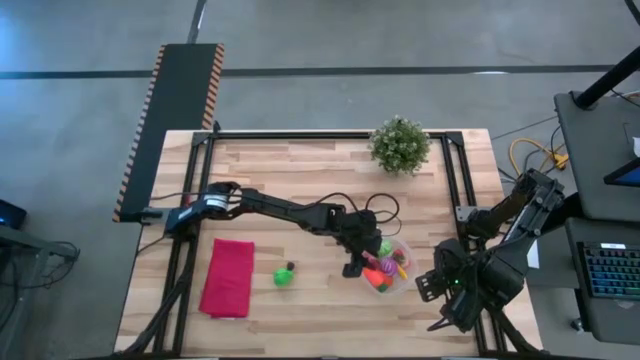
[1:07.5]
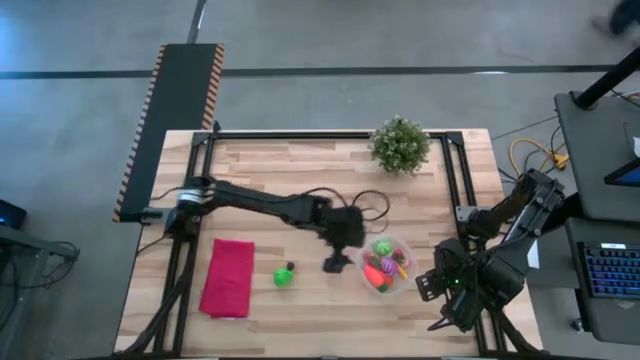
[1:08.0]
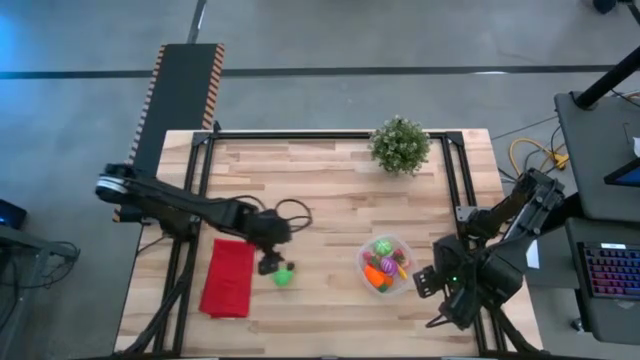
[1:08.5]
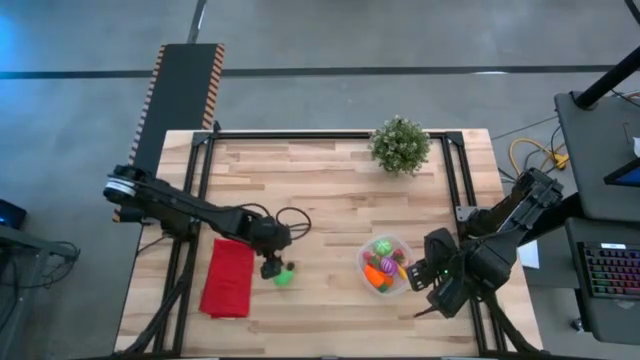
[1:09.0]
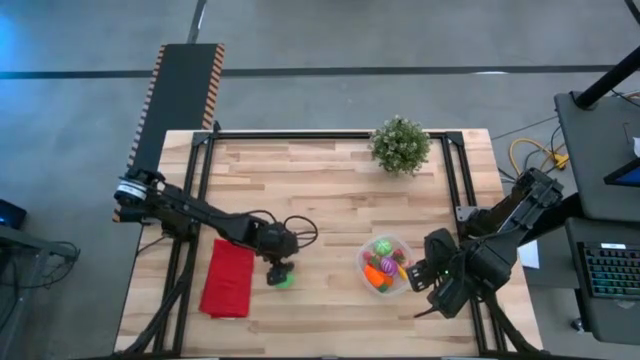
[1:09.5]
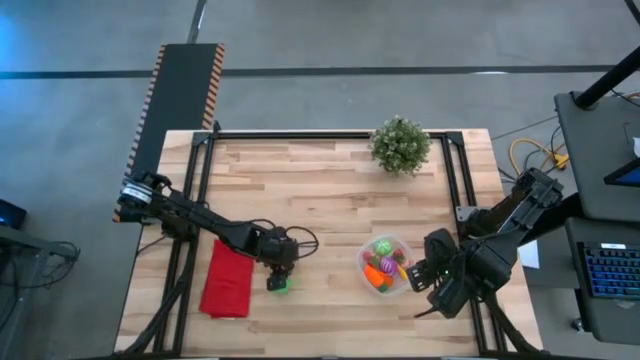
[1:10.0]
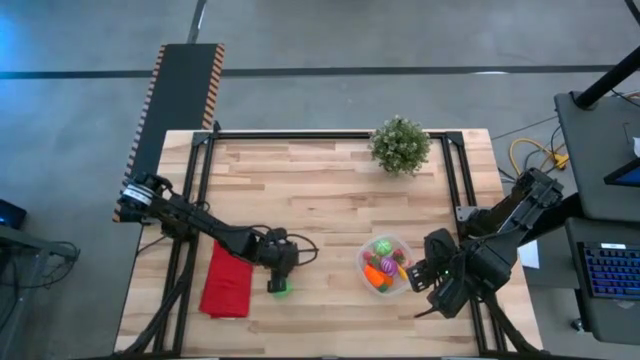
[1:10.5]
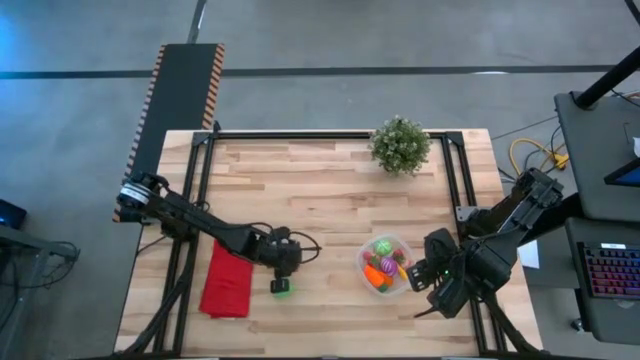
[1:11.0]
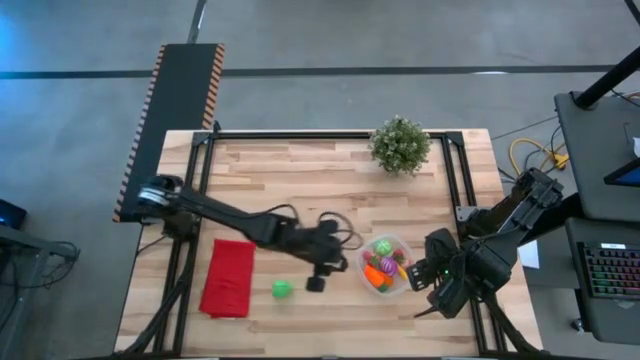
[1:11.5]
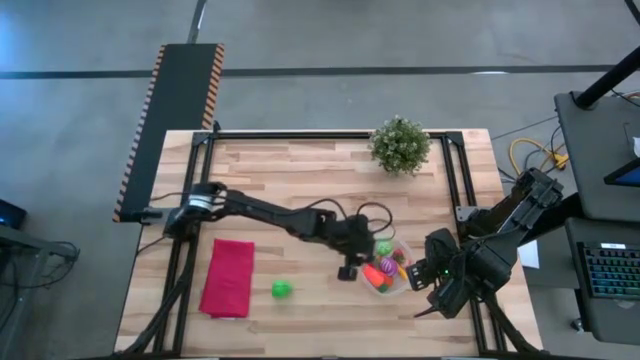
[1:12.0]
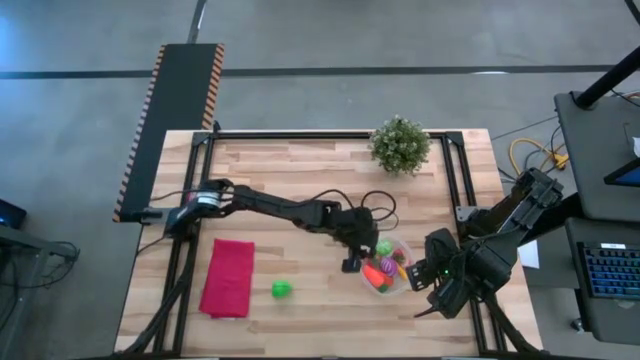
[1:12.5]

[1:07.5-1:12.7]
Task: Pick and placing Produce into tupperware
Put the blackberry into the transparent bin

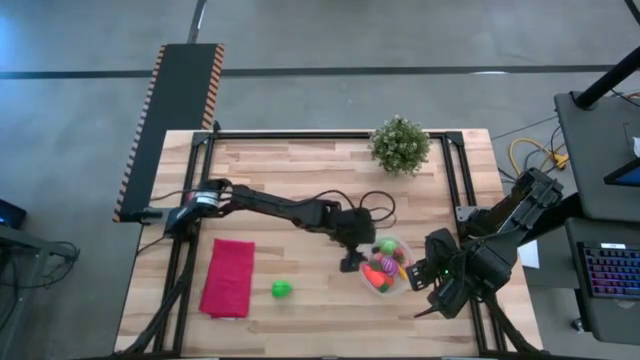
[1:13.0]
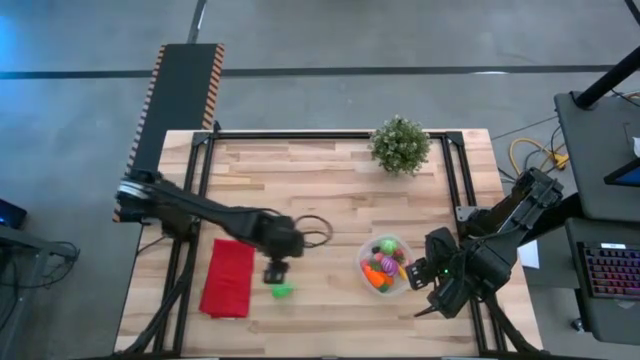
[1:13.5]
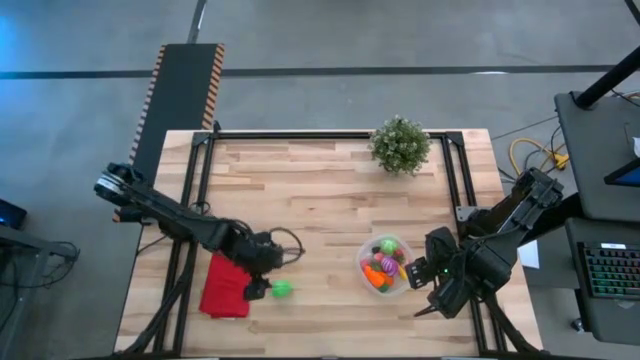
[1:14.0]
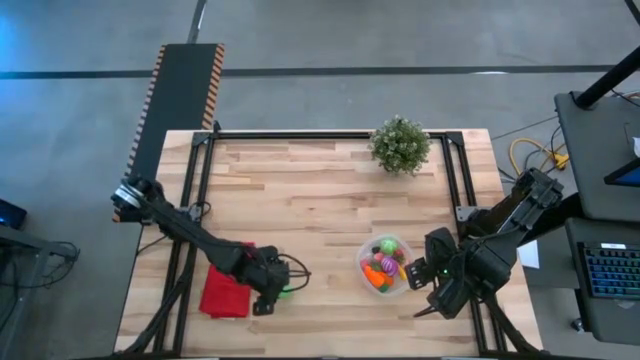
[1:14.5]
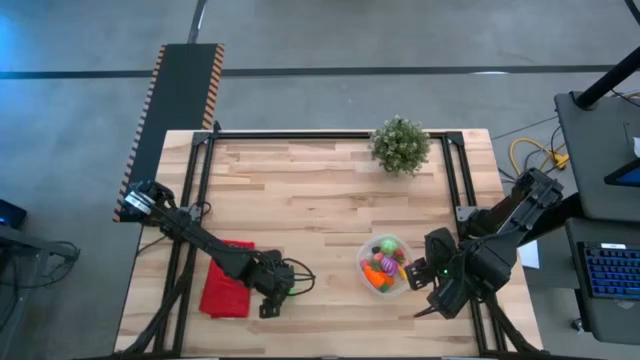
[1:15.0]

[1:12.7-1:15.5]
Put the green pear into the transparent bin

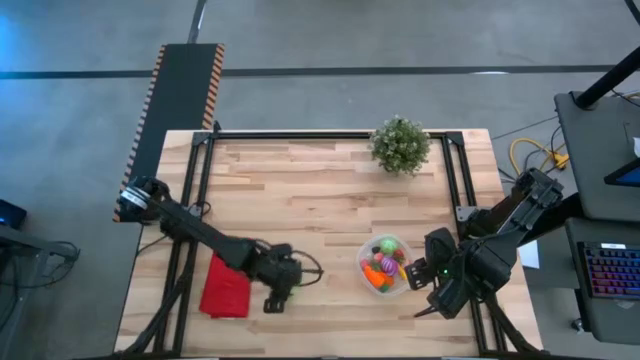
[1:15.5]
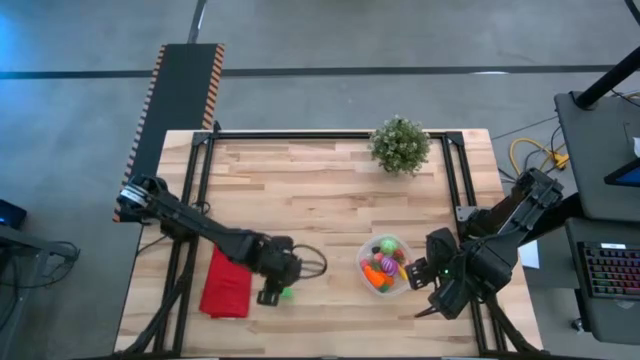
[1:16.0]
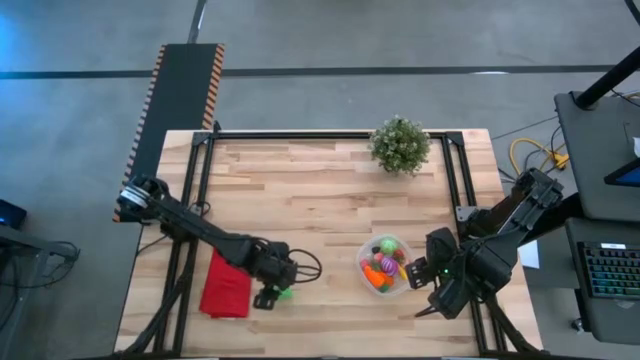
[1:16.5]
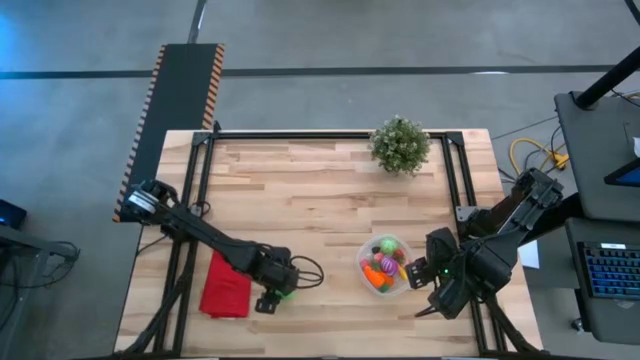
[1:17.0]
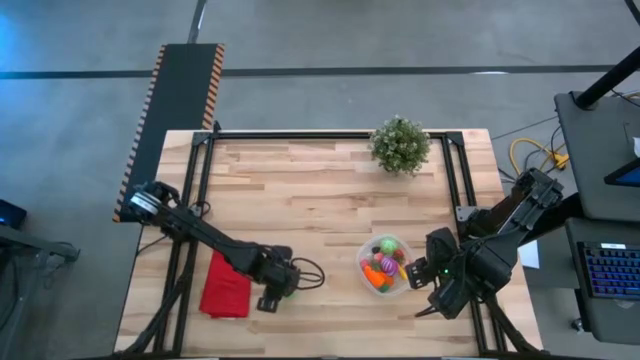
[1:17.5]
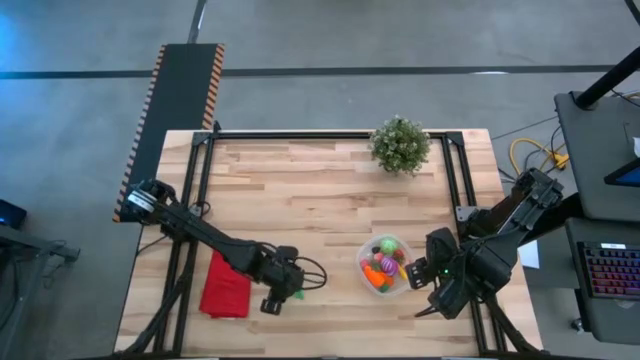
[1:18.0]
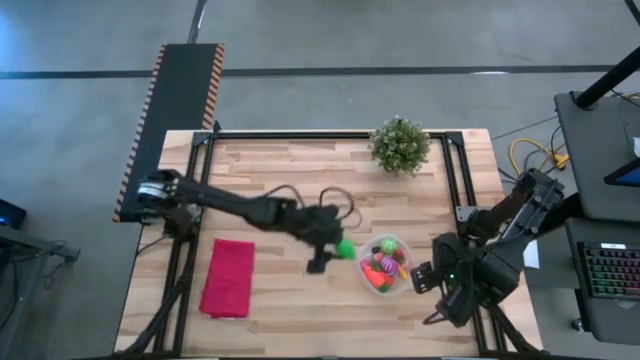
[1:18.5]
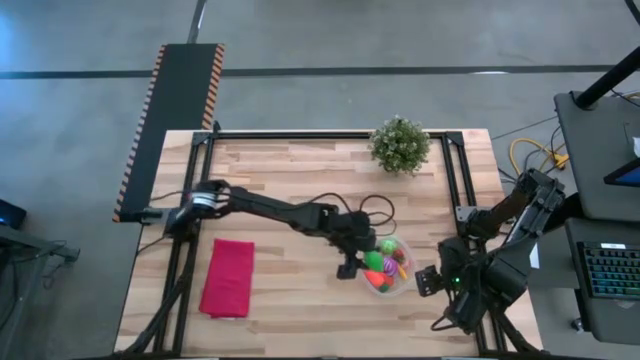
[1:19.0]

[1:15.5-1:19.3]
Put the green pear into the transparent bin

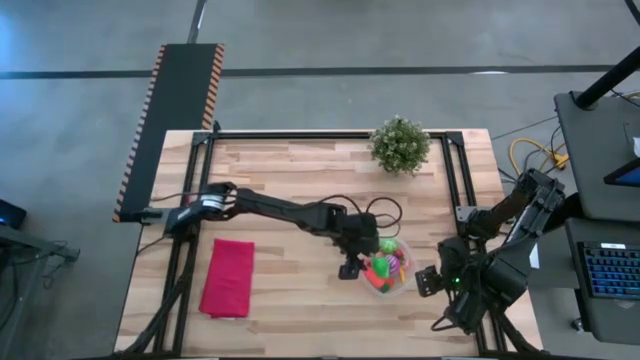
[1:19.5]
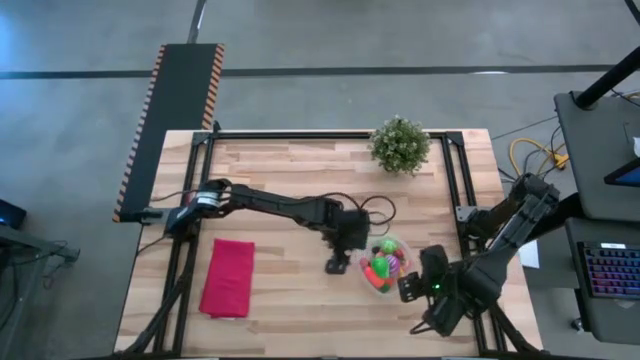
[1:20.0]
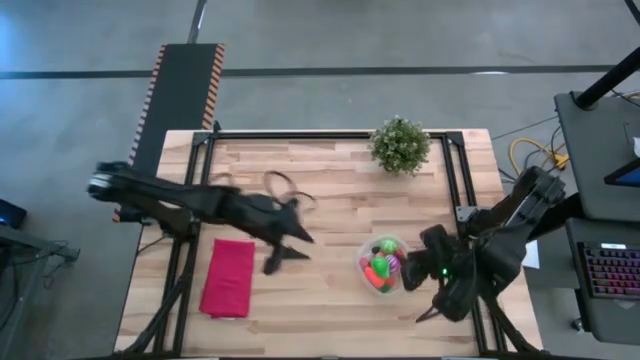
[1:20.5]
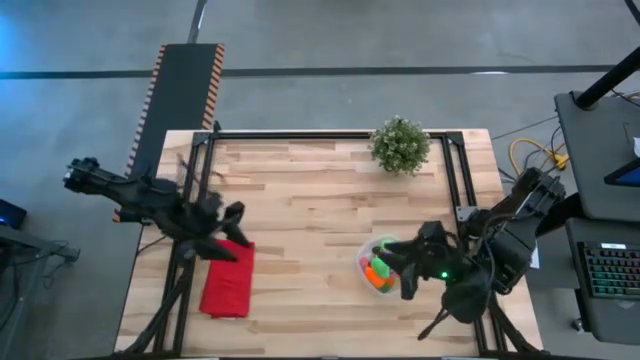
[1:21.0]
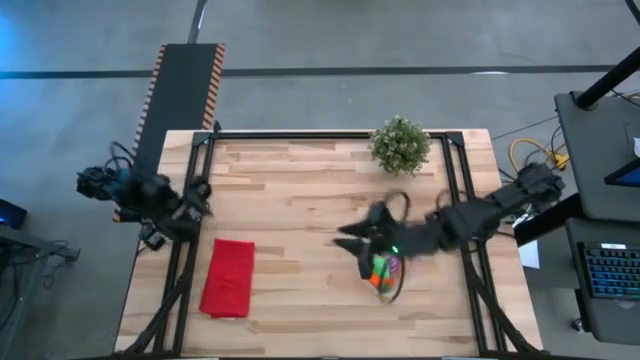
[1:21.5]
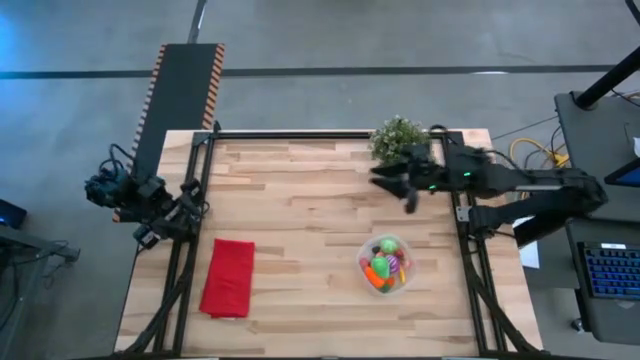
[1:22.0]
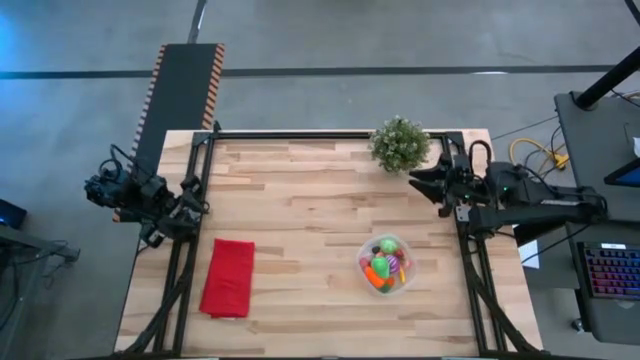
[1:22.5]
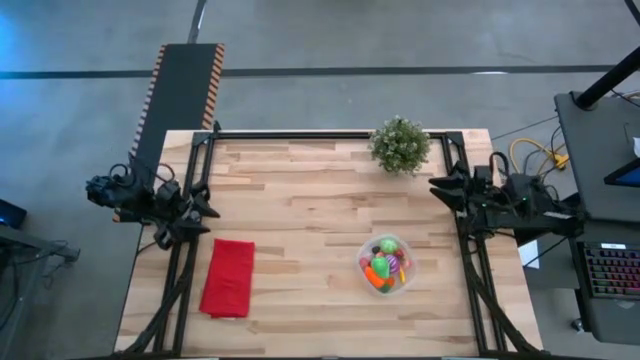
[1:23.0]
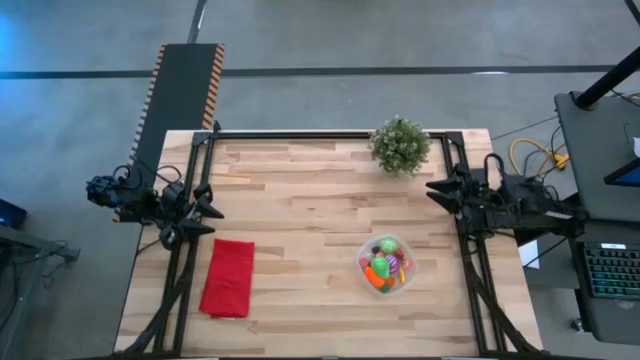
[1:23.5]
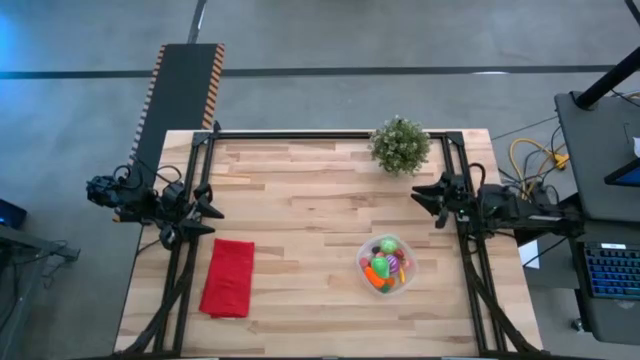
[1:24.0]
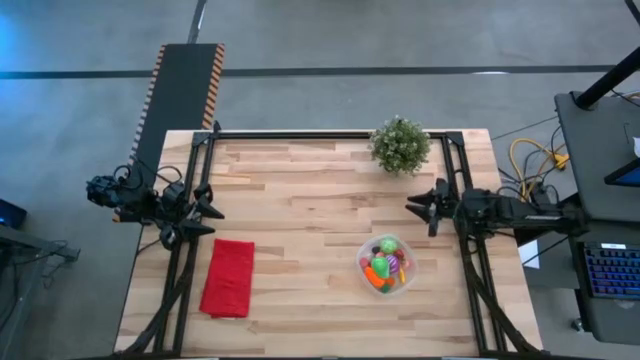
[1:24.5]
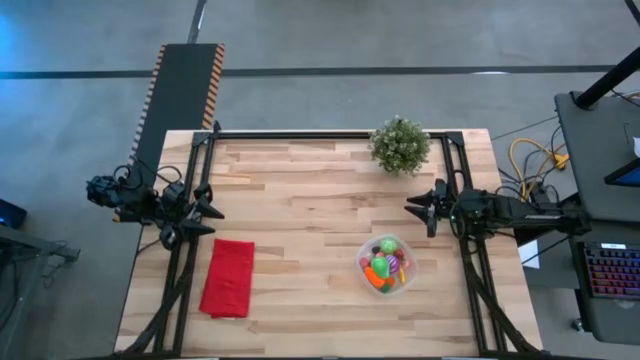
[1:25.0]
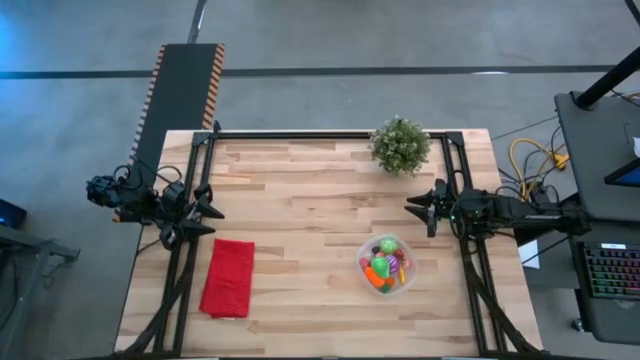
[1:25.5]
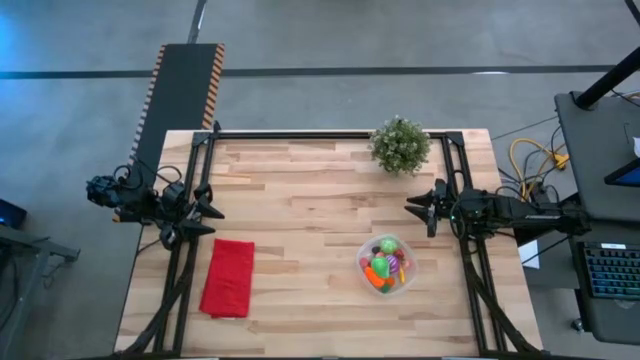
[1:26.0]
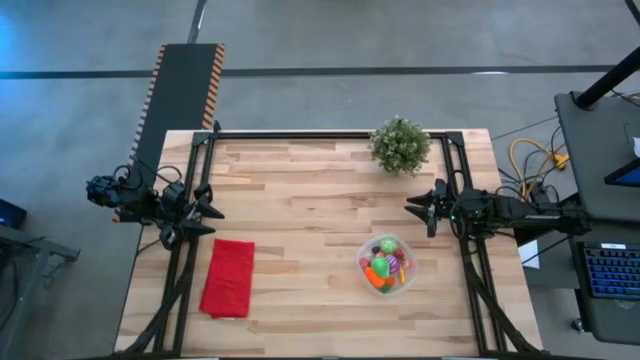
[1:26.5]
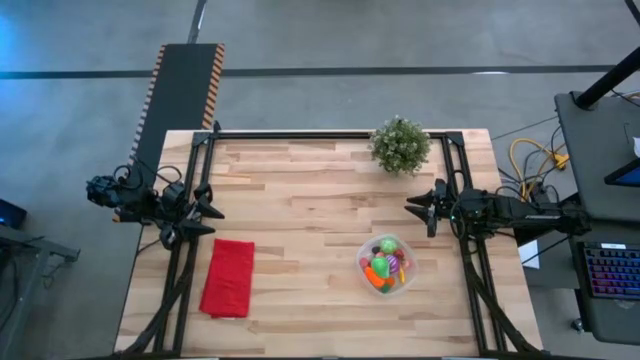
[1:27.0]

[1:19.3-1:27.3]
Return to Home Position

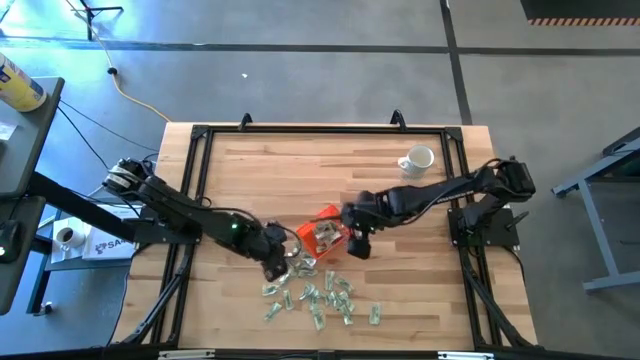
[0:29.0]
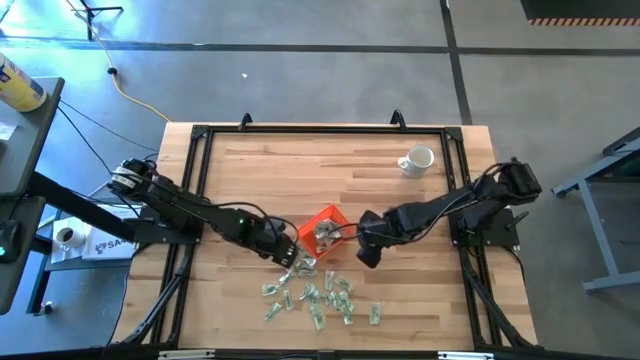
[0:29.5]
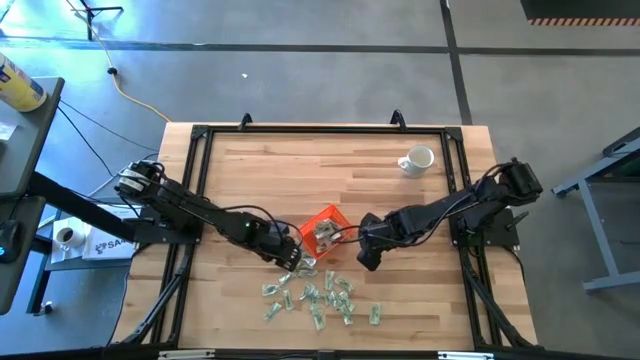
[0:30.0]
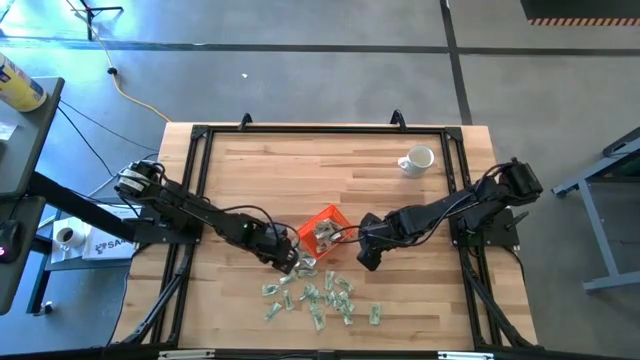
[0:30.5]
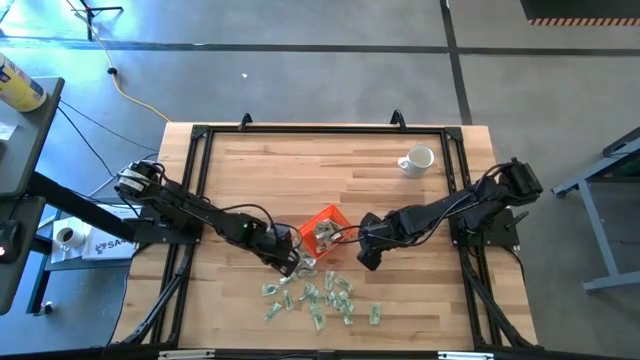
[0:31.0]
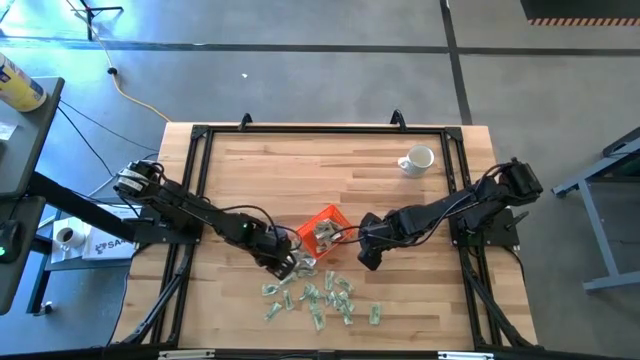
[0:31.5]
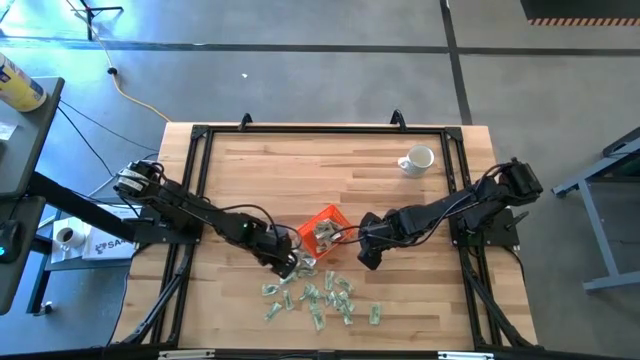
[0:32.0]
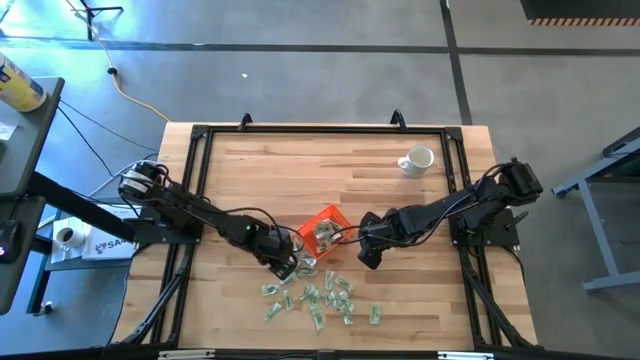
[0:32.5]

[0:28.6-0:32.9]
Task: Pick and place Stevia / Truvia into bins
Put the stevia packet into the orange bin
